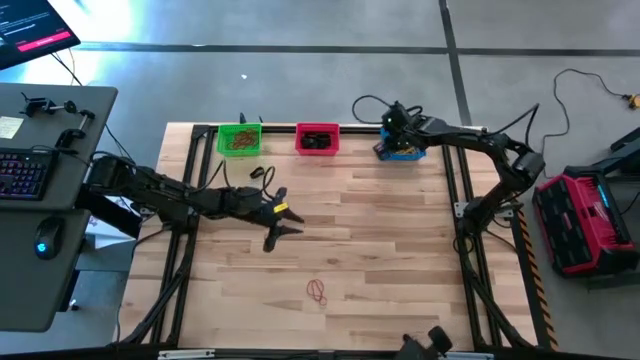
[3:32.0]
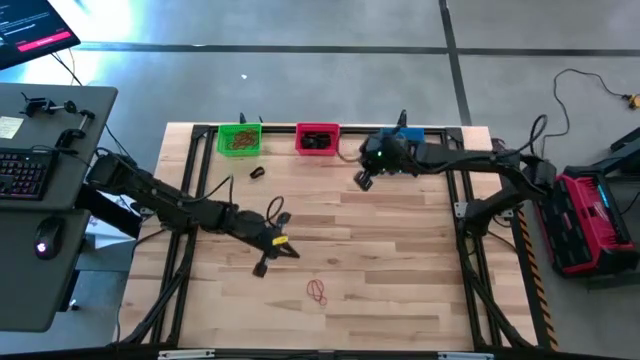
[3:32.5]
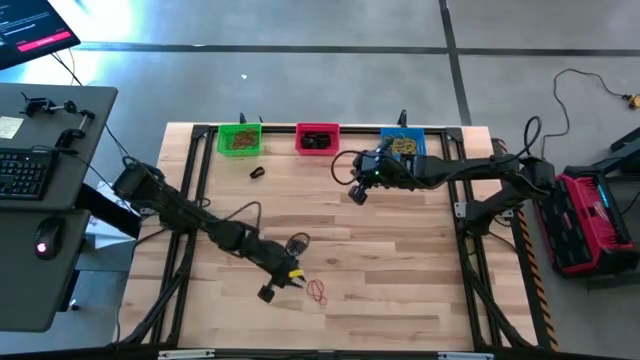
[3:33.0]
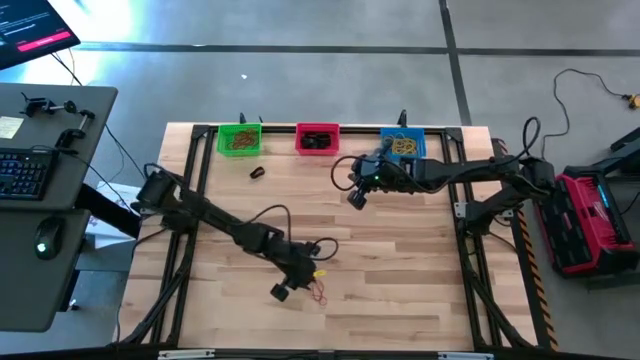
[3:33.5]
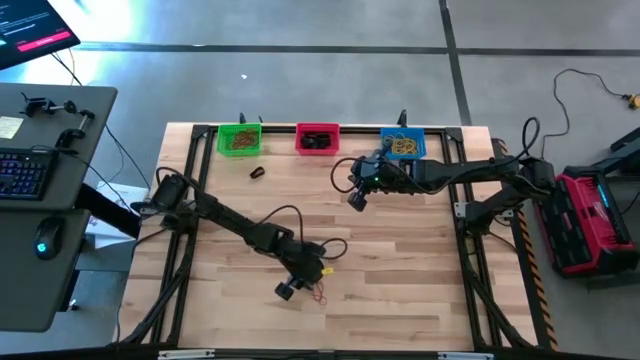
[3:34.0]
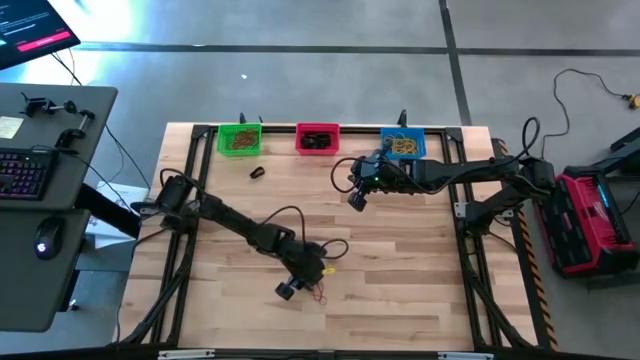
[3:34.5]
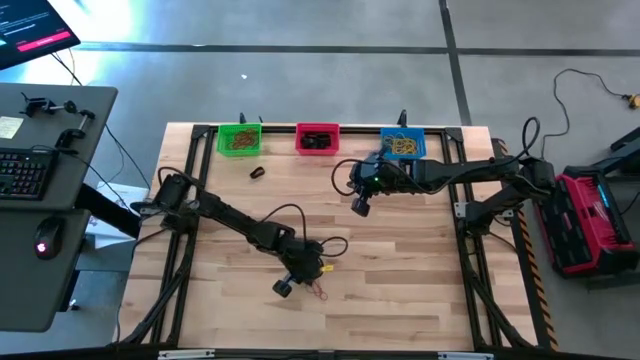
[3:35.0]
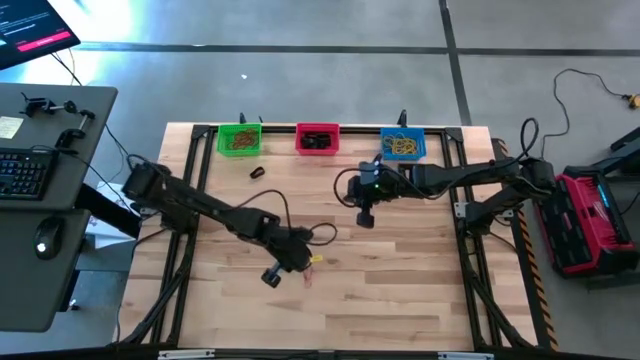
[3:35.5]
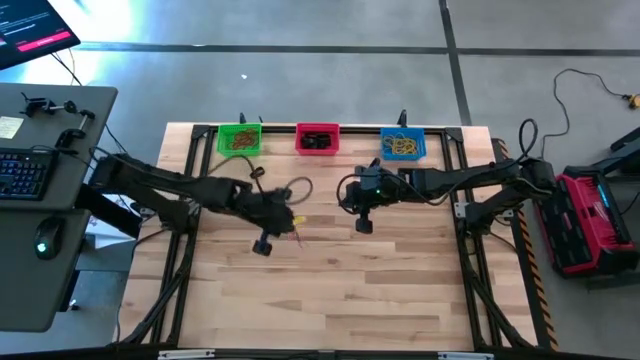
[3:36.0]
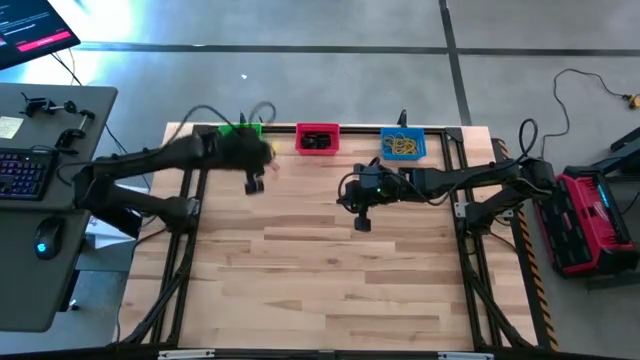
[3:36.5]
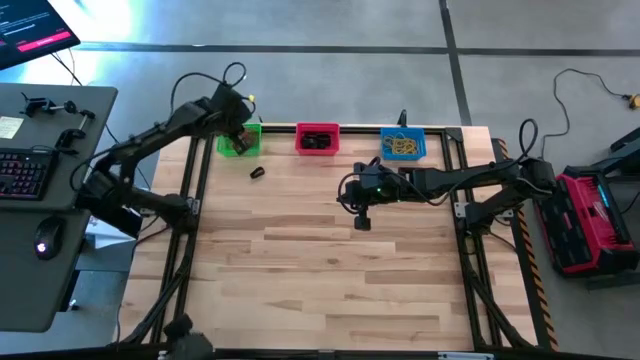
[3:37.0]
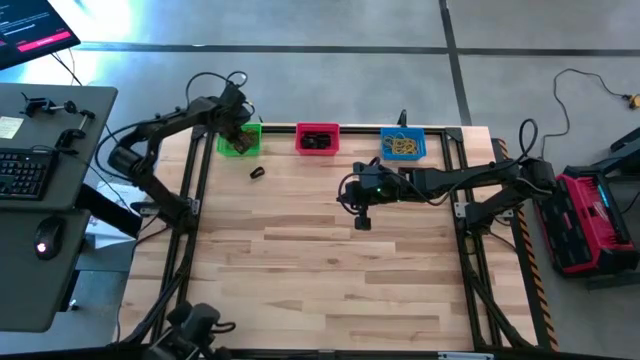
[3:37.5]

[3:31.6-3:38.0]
Task: Sort rubber bands into baskets
Put the red rubber band into the green bin

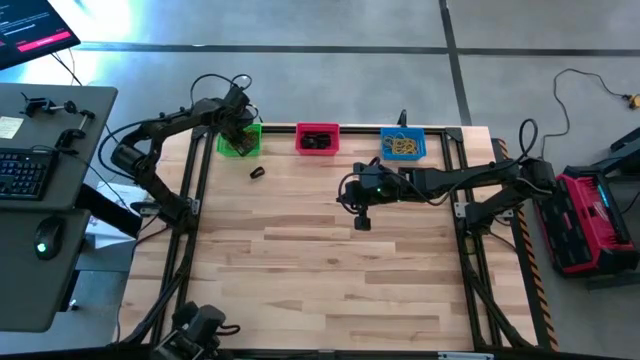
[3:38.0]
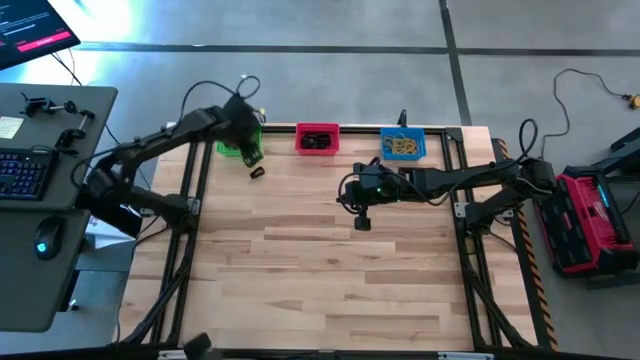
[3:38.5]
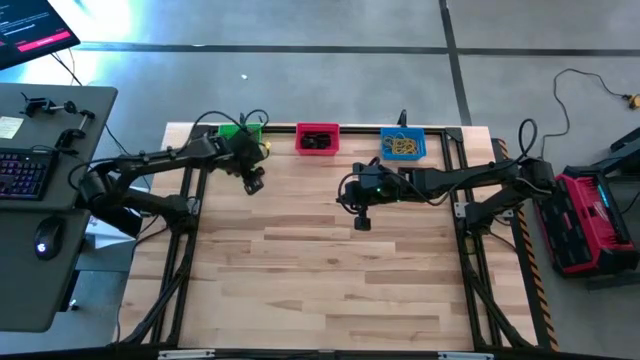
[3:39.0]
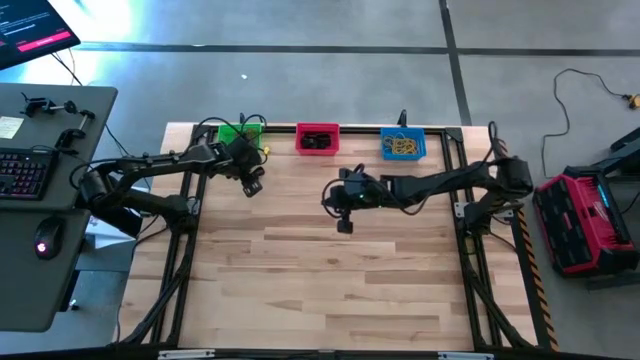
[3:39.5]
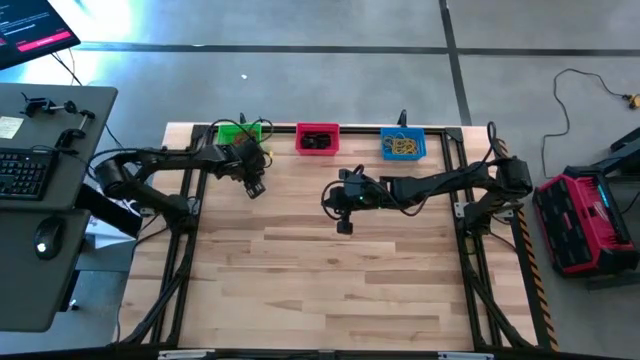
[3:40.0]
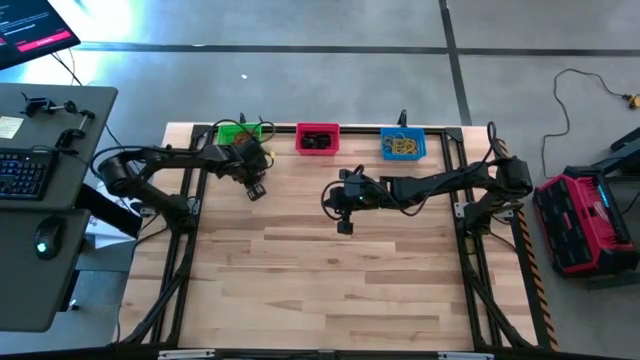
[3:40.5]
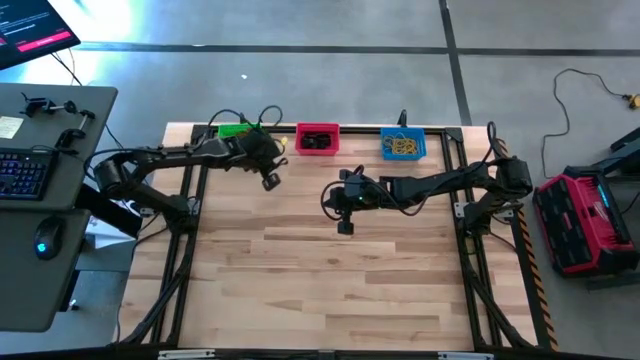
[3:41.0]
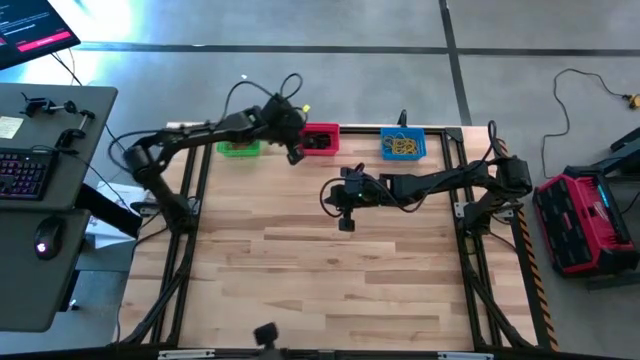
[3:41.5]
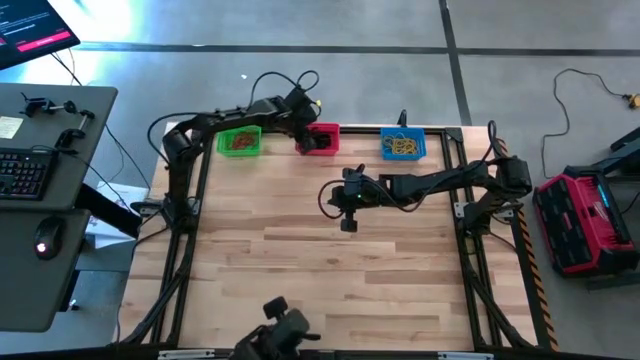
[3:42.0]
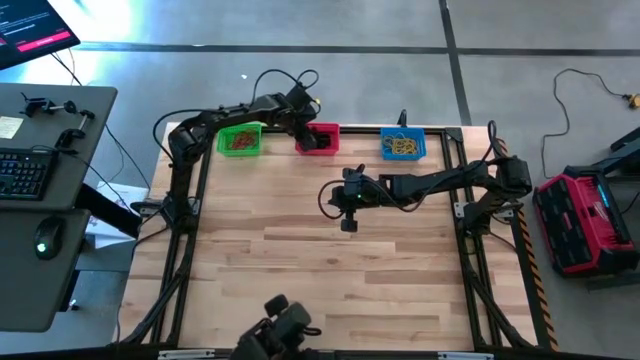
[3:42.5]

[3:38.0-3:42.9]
Put the black rubber band into the red bin

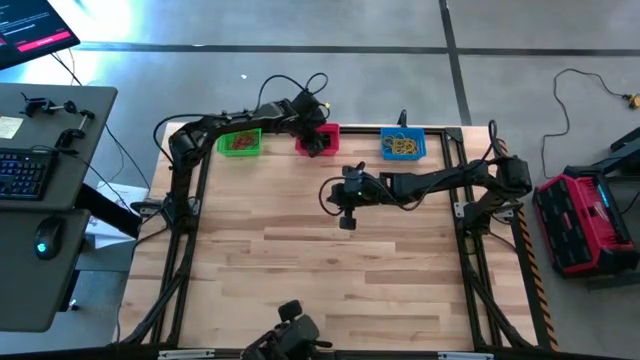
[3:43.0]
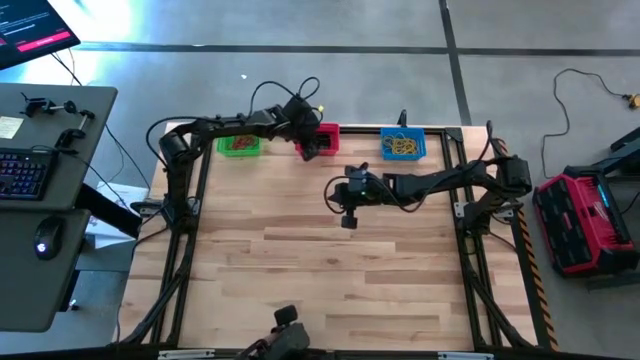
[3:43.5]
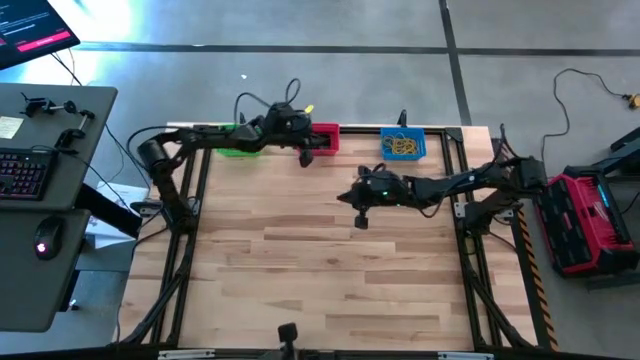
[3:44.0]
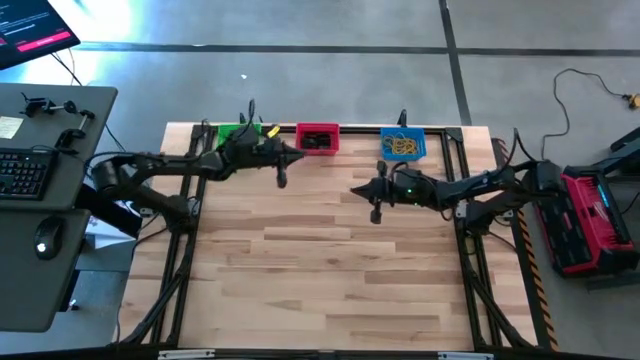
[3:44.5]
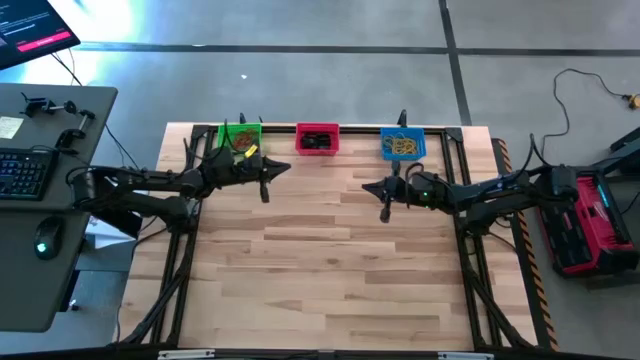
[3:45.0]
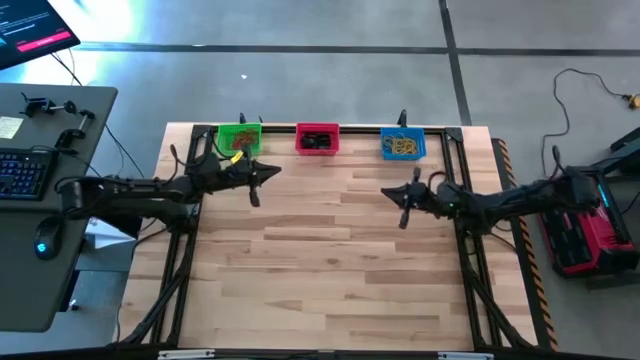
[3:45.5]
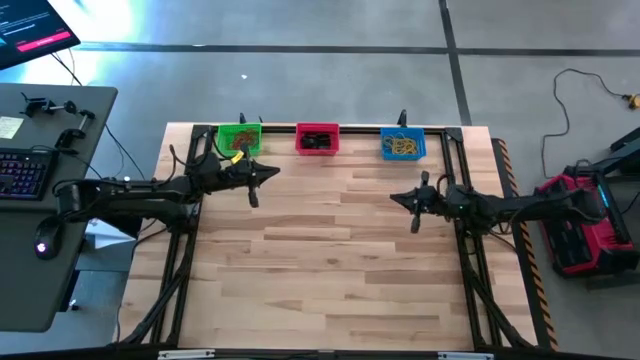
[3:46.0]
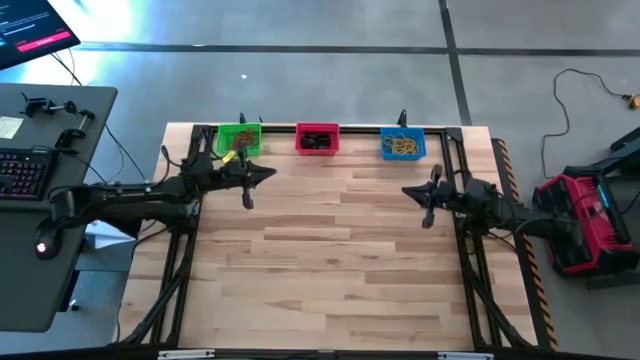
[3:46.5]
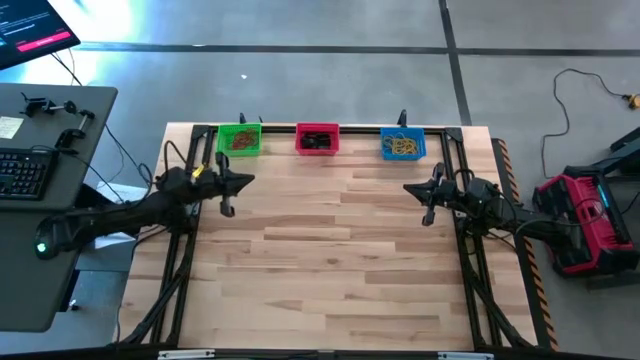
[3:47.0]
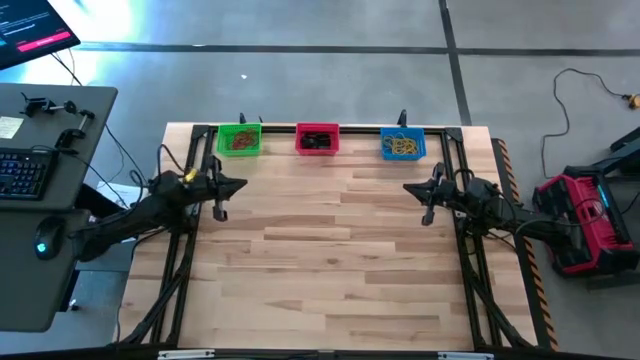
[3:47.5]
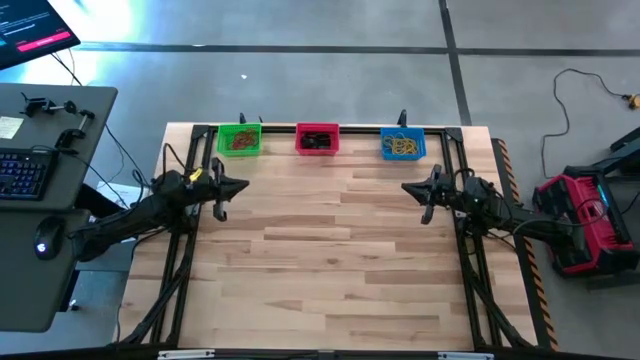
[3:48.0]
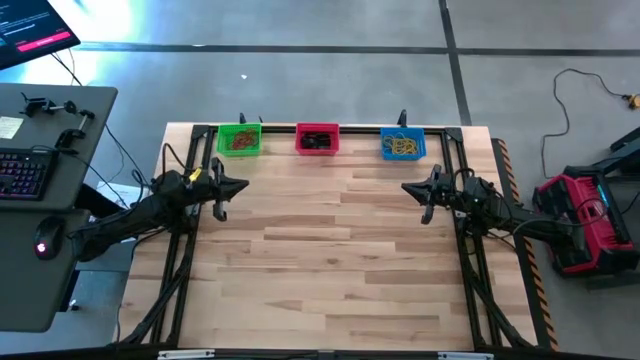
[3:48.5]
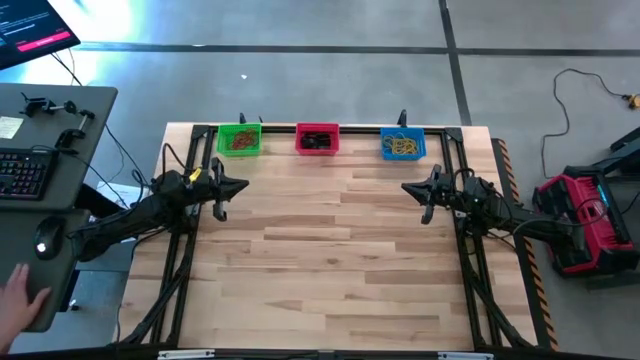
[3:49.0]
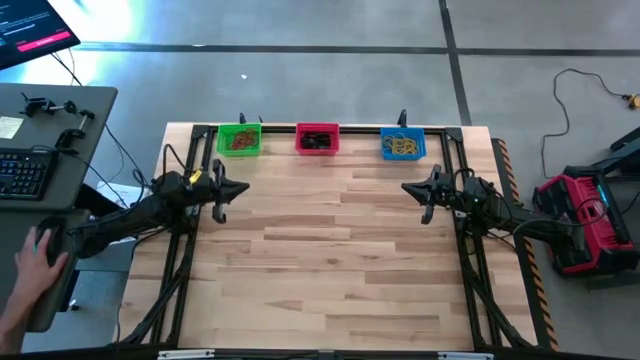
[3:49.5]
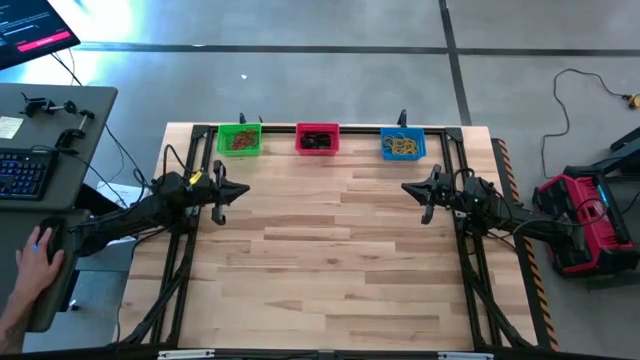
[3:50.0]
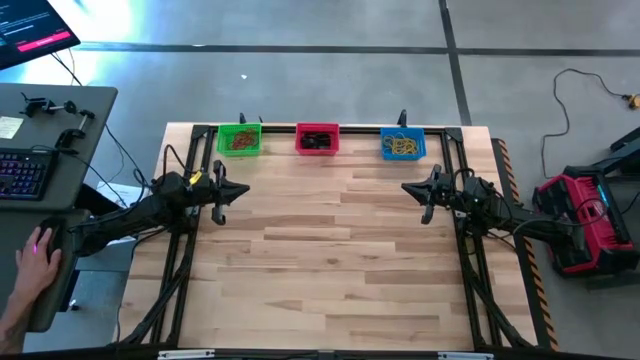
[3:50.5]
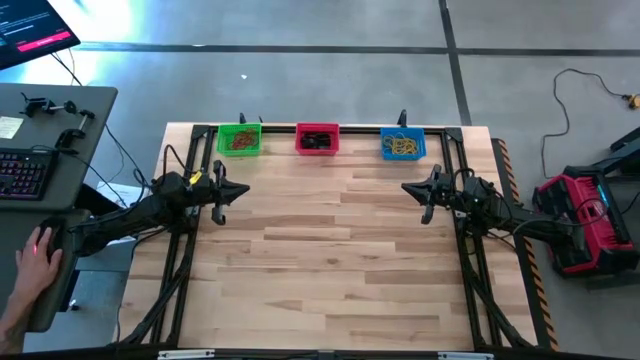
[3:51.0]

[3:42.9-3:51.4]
Return to Home Position

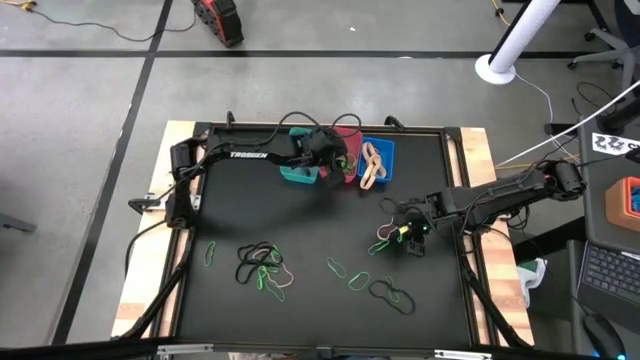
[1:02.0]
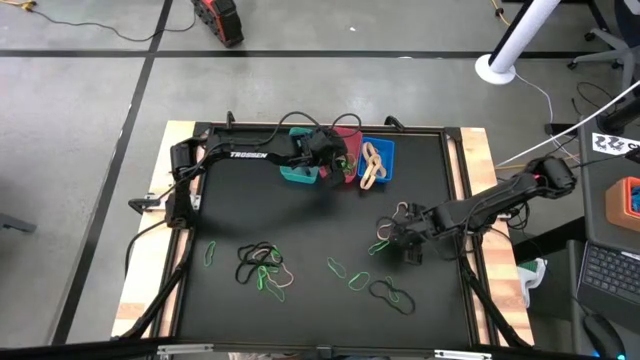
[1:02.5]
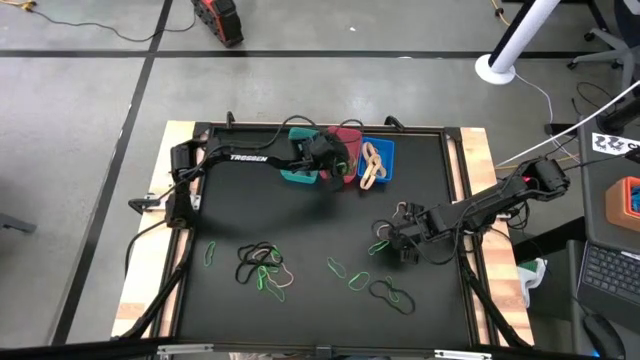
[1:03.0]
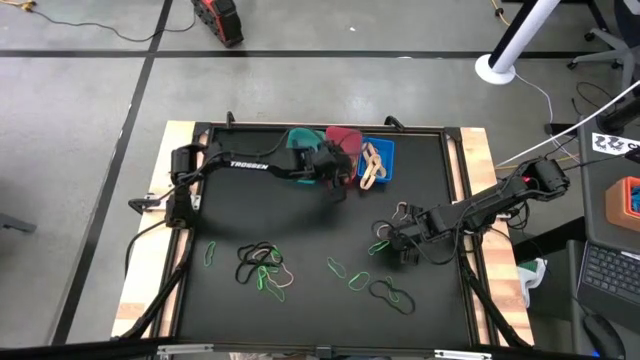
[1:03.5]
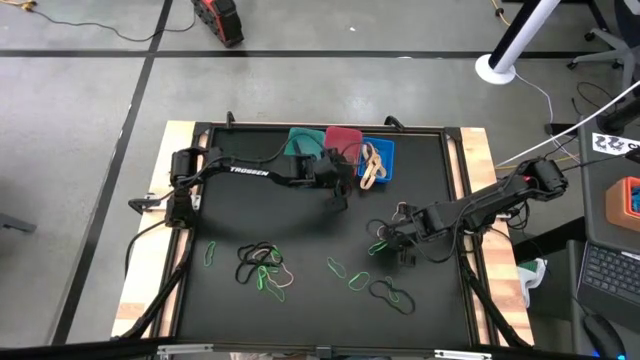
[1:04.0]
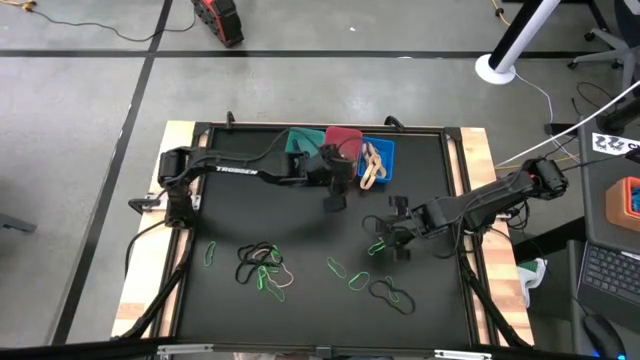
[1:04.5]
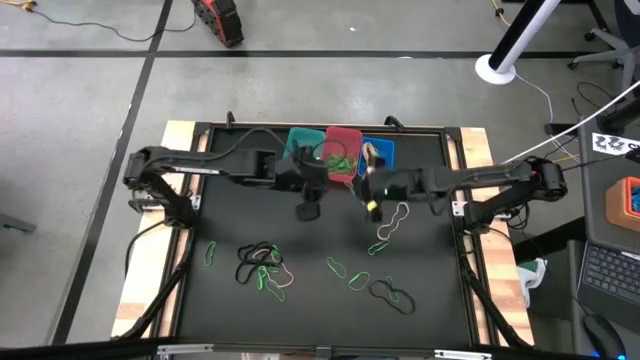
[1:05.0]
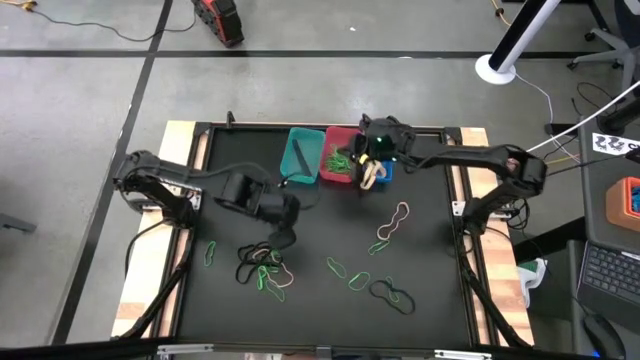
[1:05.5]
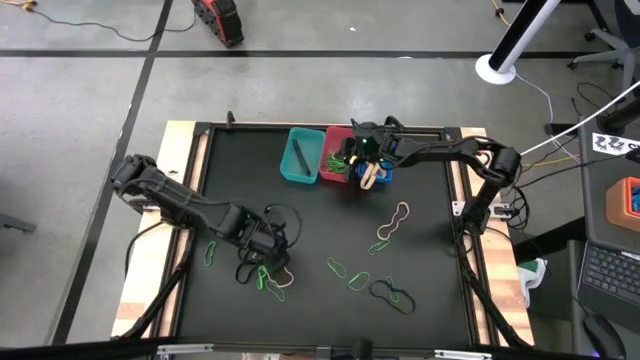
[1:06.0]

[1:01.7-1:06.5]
Task: Sort rubber bands into baskets
Put the green rubber band into the pink bin
